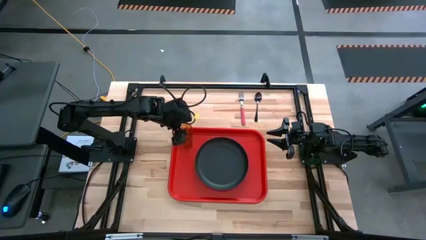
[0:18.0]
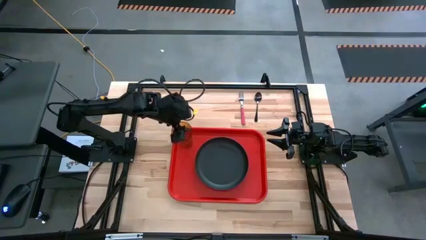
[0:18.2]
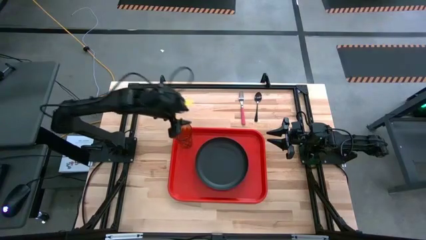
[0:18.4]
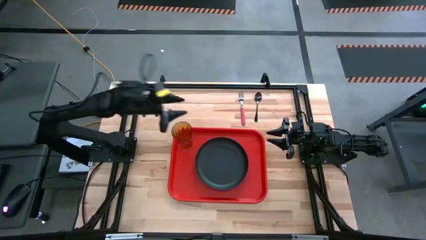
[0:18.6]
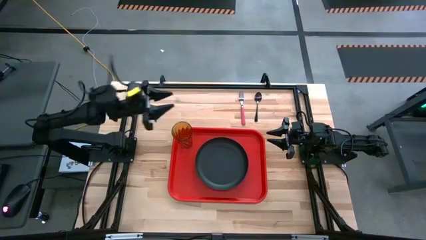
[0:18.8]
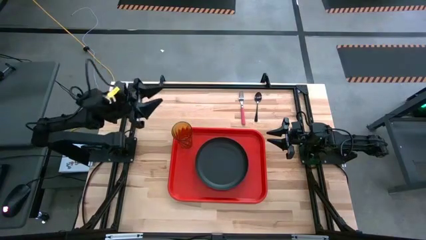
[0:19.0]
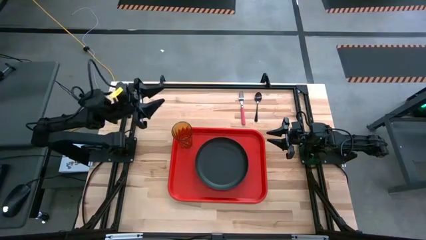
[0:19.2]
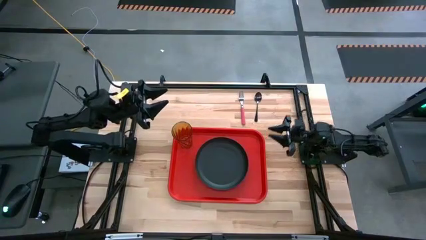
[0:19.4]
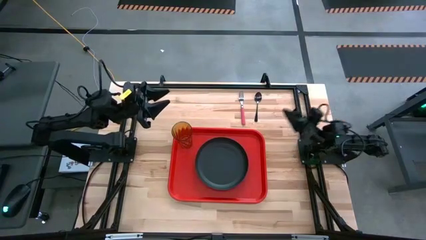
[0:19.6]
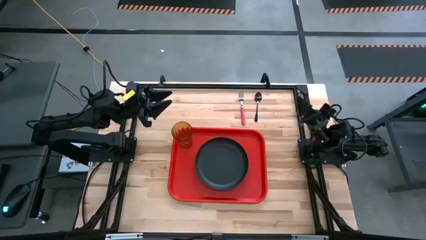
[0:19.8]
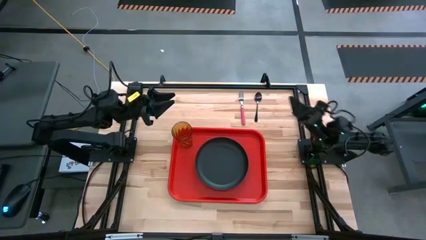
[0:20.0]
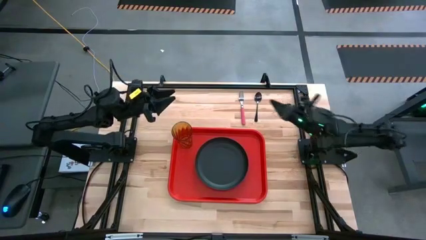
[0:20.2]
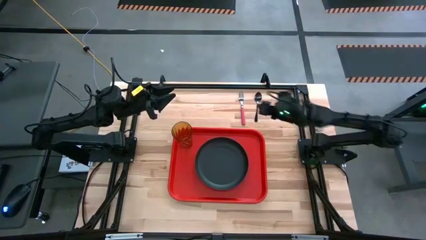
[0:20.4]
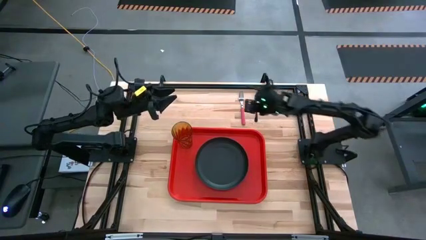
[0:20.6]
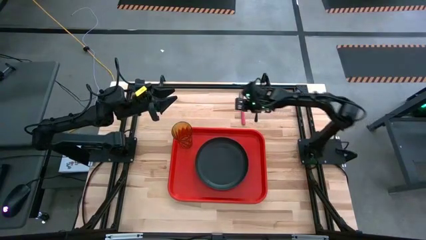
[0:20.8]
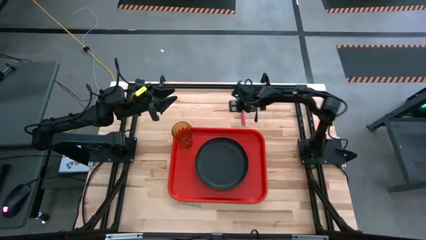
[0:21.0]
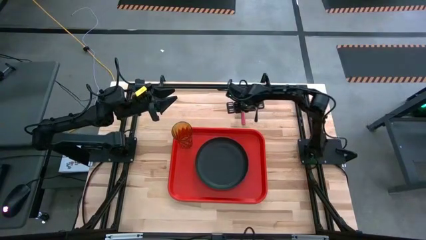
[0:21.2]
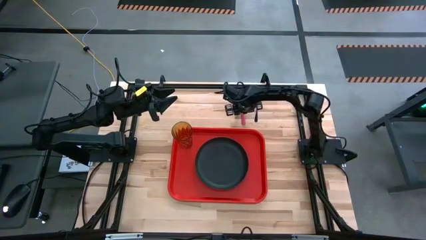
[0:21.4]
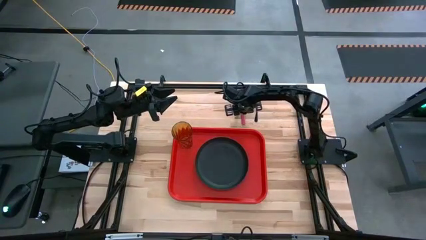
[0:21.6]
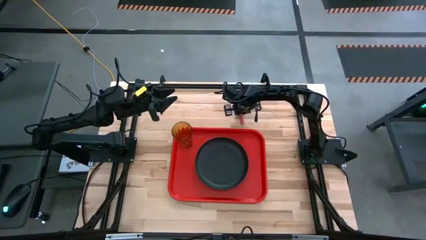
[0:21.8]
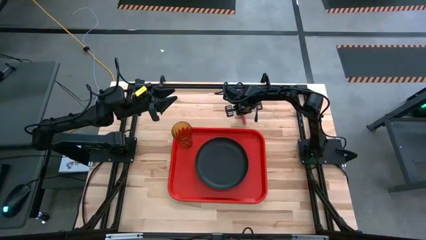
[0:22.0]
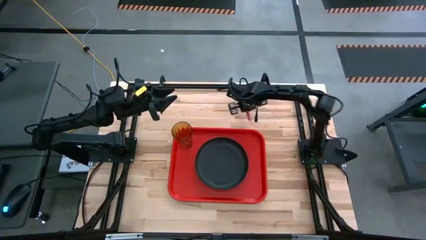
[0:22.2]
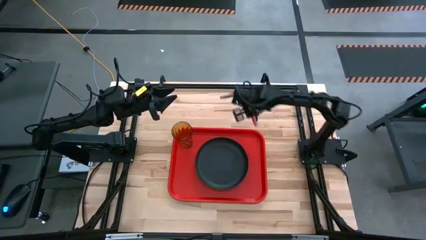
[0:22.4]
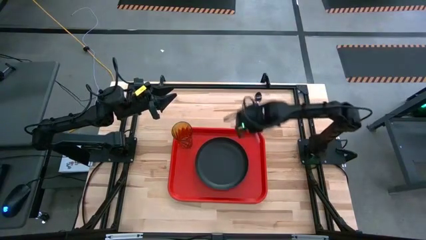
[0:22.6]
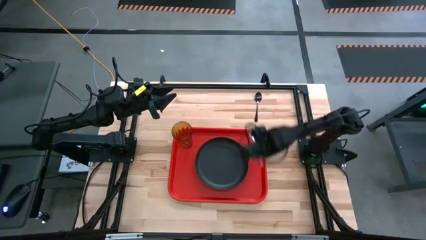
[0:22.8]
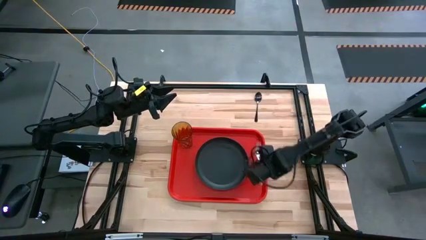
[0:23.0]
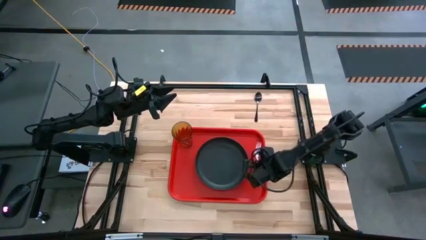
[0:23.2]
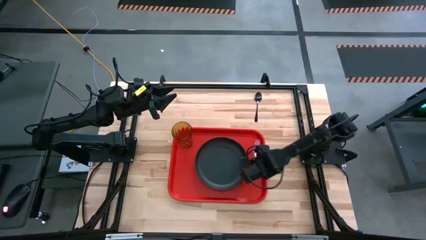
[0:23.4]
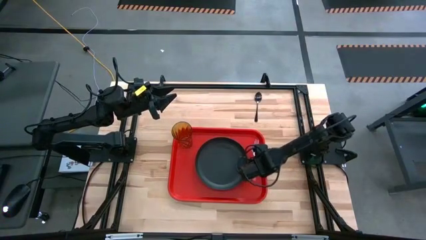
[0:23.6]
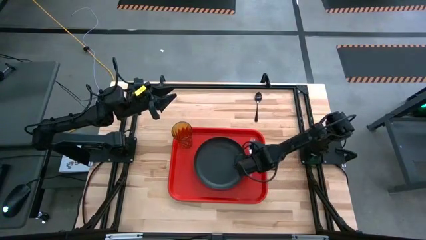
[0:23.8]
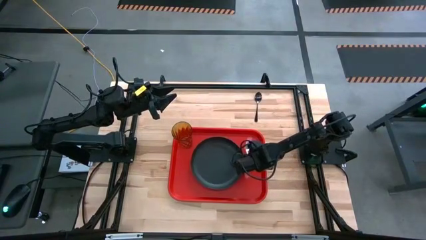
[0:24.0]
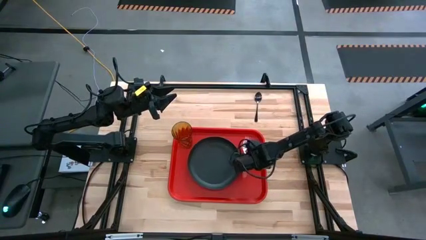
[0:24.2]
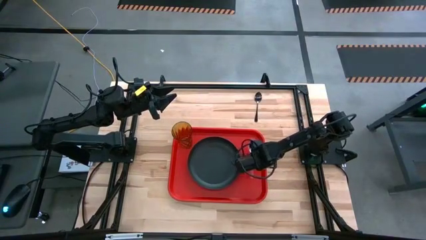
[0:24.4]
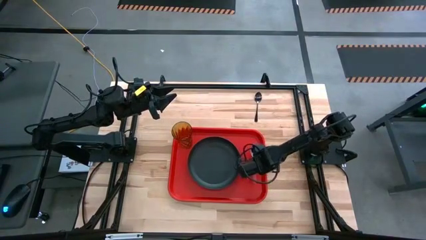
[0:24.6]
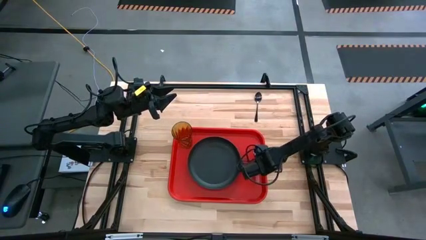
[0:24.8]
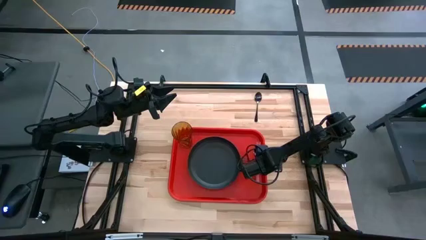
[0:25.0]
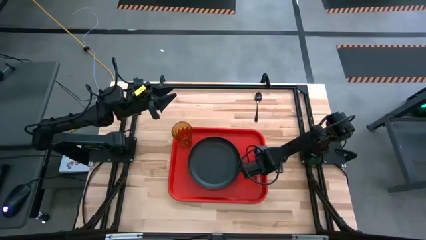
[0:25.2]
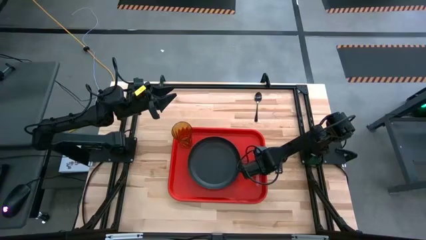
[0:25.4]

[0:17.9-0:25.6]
Task: Pick and place plate/cup/fork/spoon on tray
Put the pink fork on the right side of the the black plate on the red tray

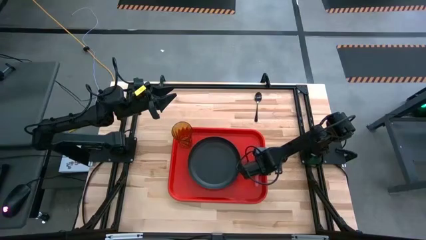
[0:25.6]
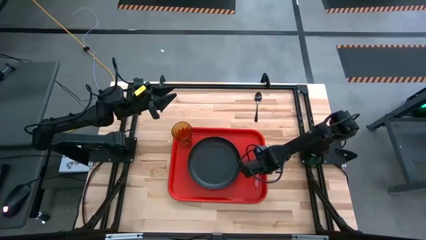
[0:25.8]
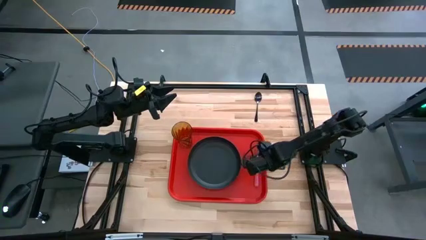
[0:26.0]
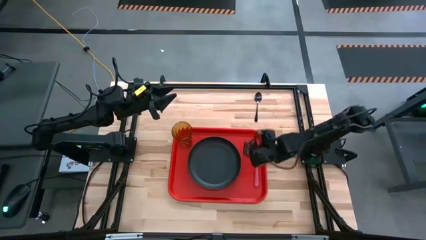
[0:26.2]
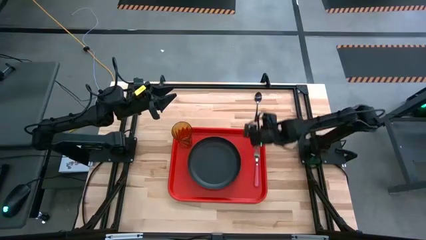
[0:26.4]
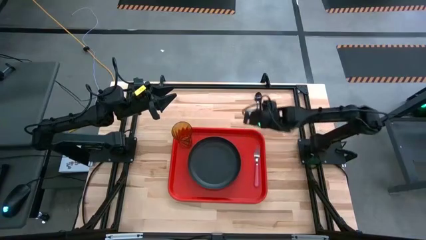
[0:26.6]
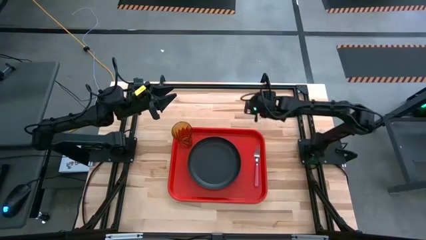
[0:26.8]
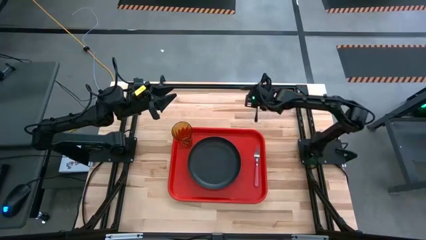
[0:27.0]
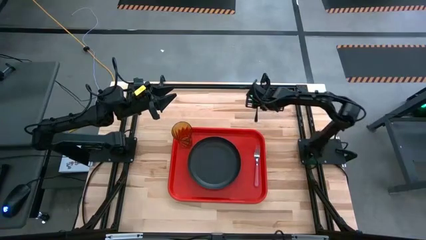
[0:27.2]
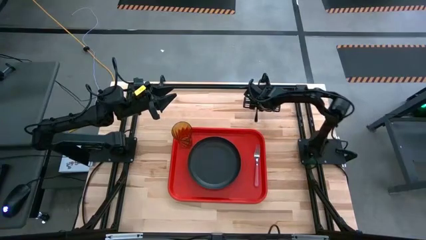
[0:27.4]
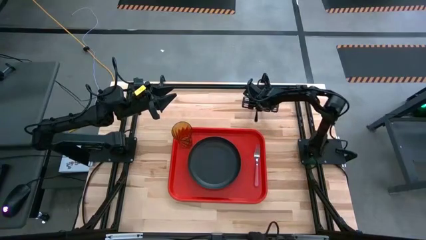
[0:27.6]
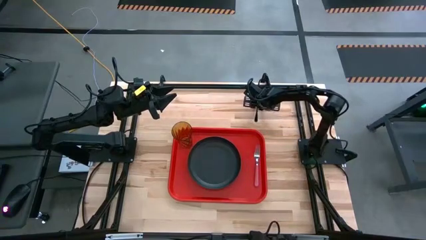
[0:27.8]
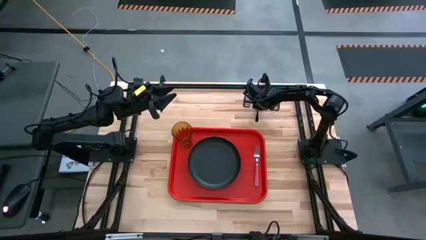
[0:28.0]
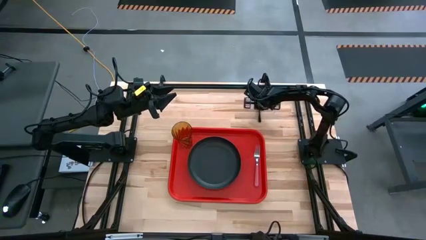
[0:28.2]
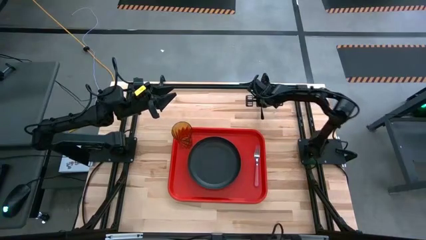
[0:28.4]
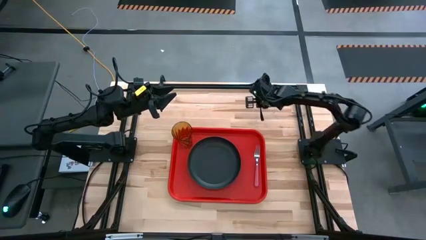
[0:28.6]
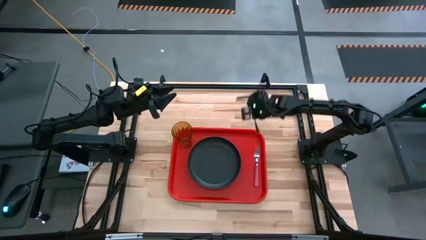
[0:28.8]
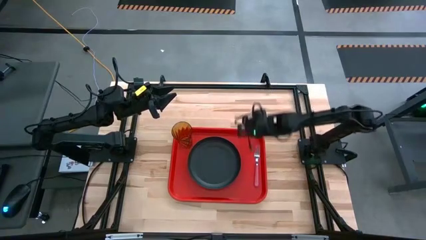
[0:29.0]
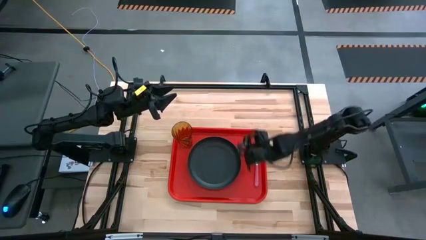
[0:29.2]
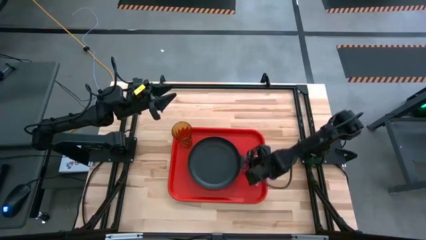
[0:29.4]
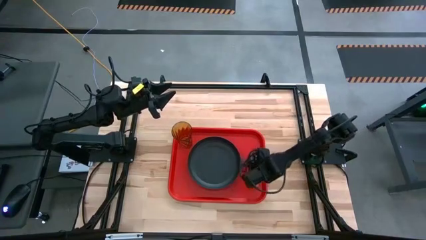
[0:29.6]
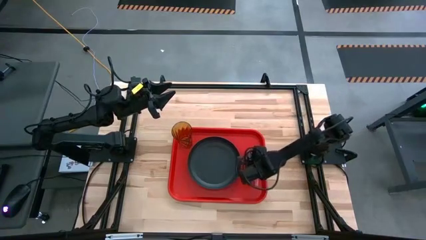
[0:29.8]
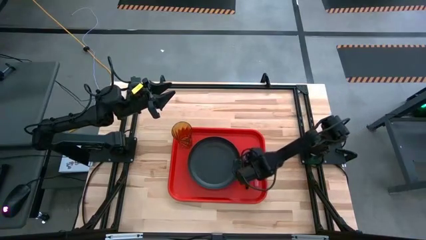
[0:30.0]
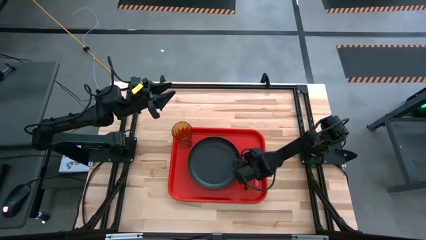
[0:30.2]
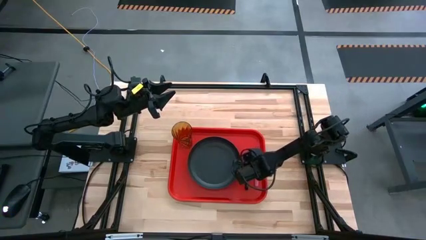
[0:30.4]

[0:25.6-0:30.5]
Put the black spoon between the black plate and the pink fork on the red tray

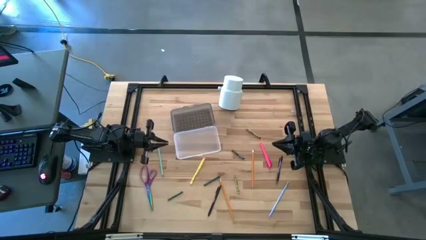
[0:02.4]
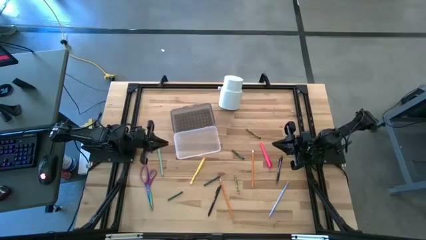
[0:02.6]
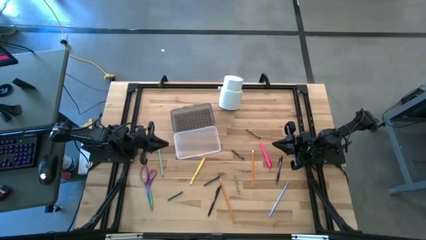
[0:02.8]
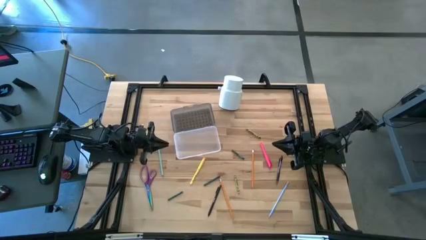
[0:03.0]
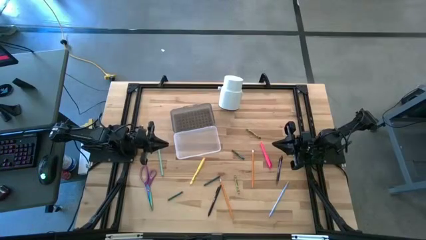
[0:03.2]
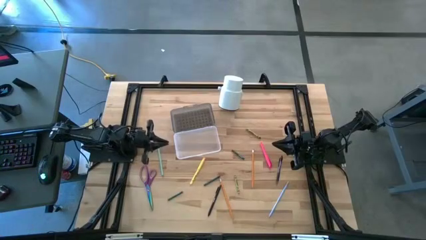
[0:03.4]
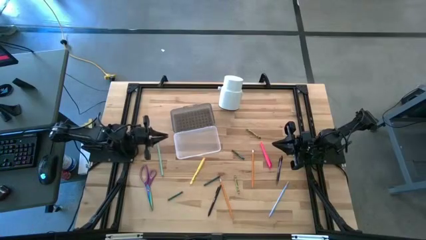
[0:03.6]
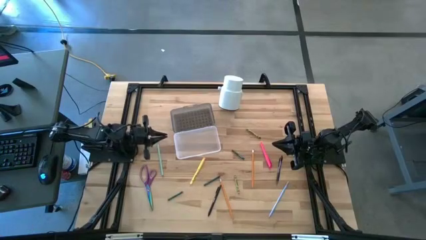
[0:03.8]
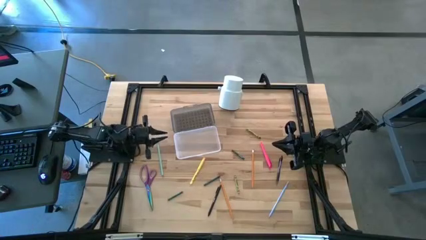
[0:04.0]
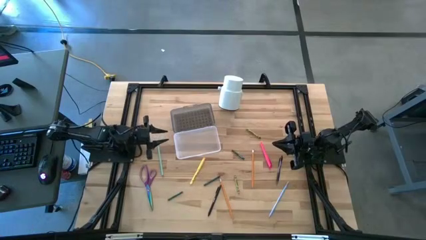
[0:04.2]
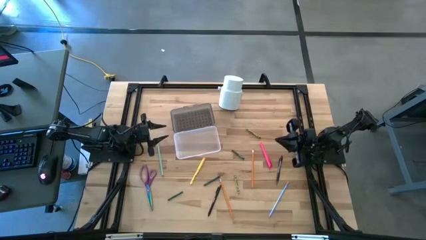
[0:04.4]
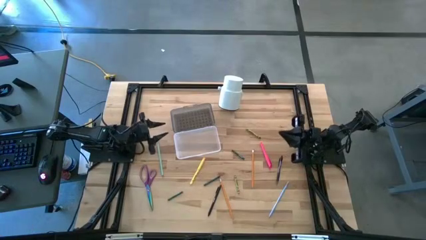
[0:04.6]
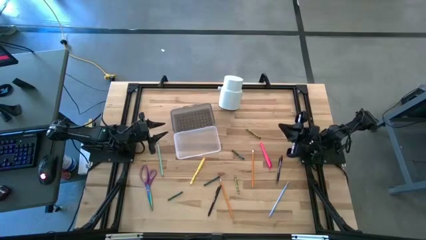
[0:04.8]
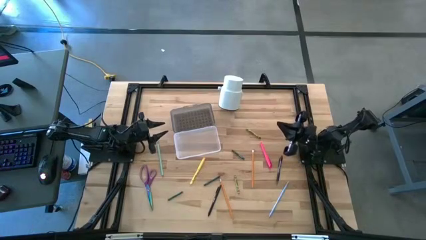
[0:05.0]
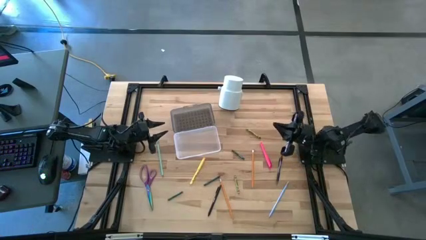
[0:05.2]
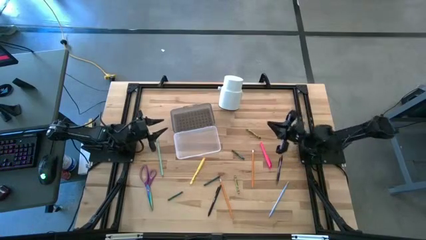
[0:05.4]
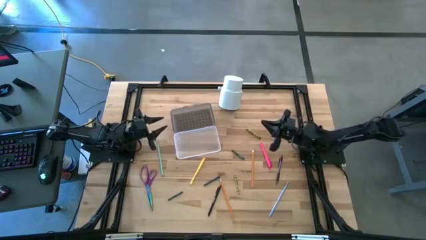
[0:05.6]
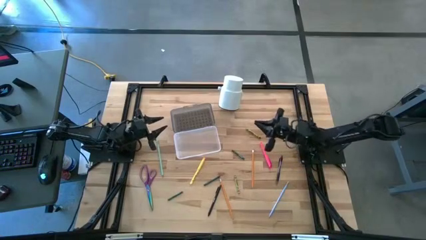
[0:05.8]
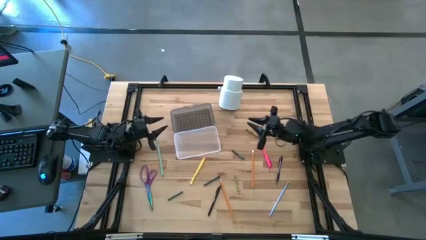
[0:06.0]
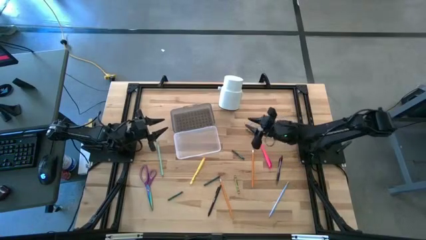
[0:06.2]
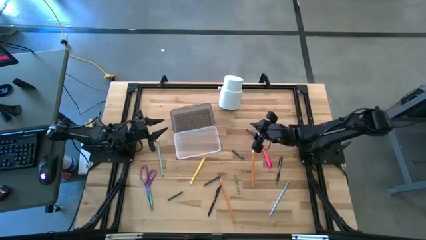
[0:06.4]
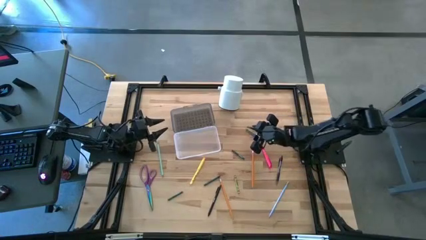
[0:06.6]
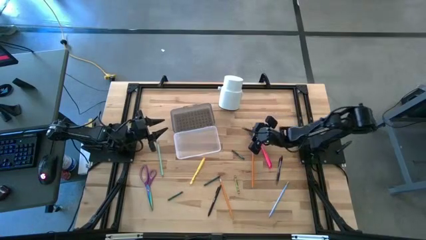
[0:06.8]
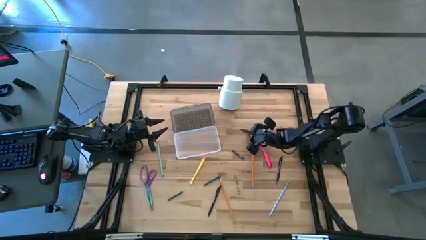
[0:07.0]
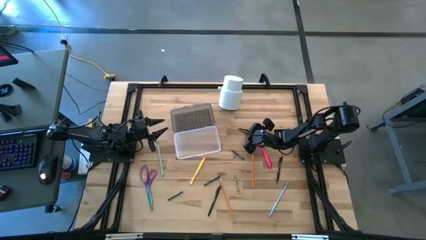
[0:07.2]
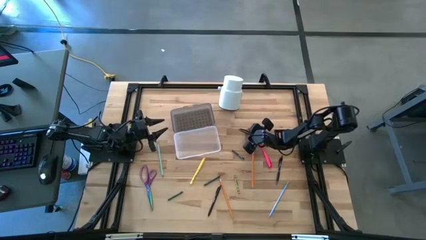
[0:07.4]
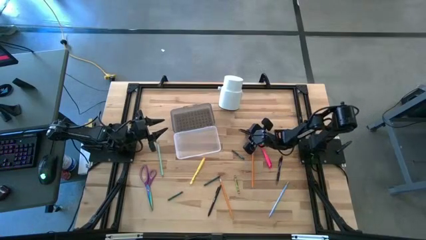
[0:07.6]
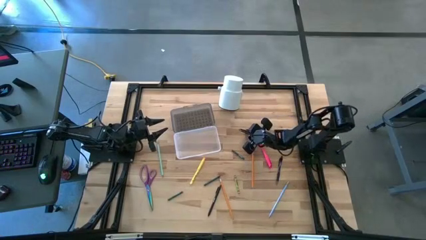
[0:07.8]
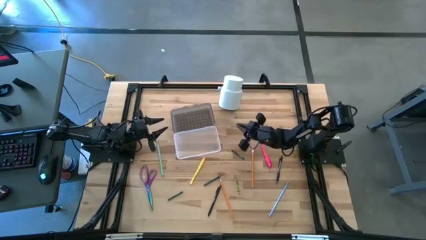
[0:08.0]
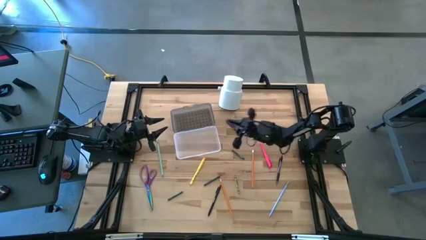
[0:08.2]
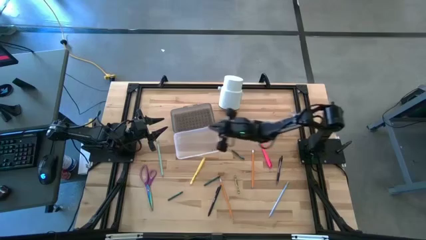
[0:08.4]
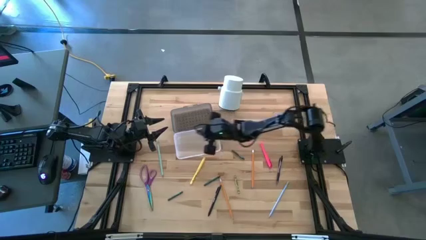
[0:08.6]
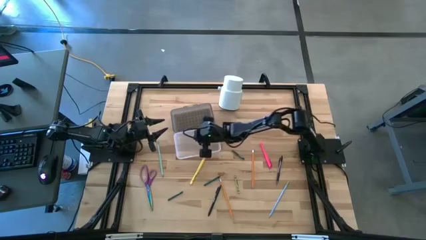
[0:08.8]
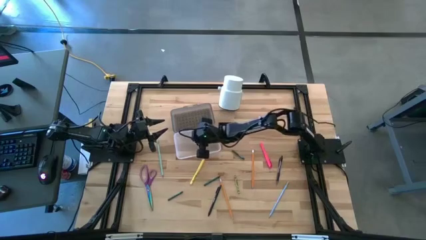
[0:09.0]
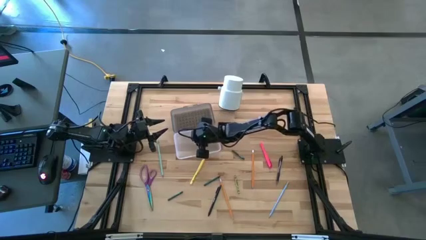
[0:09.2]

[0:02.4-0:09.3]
Task: Pick & place school supplies into a supply box
Put the top light green crayon into the black supply box
